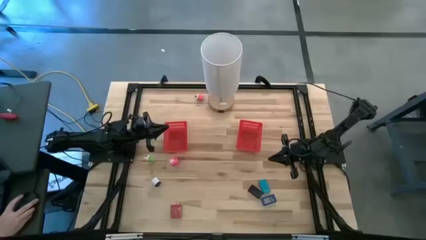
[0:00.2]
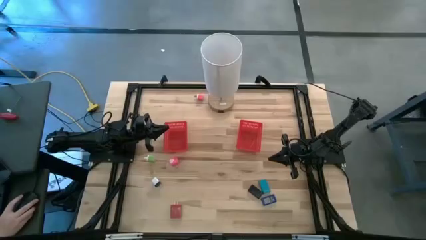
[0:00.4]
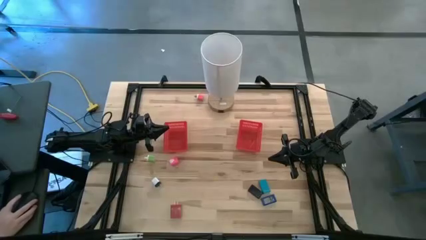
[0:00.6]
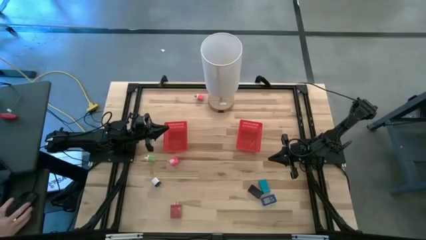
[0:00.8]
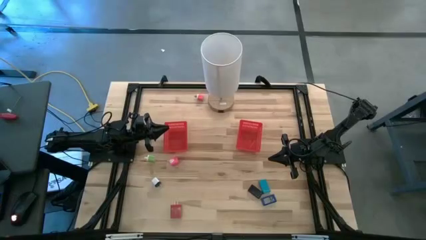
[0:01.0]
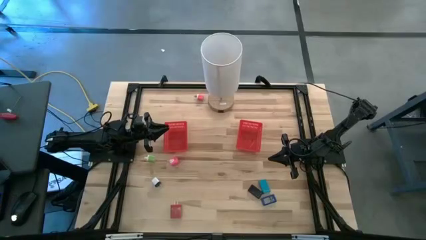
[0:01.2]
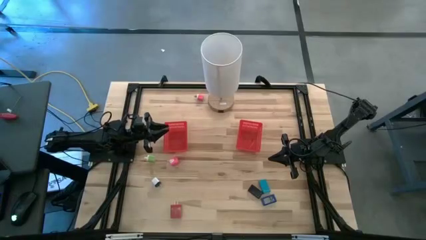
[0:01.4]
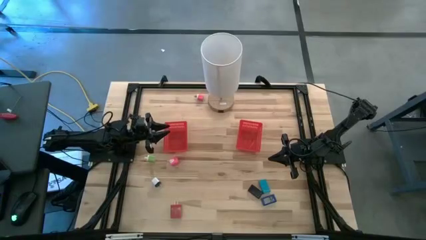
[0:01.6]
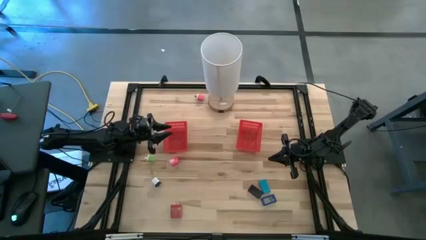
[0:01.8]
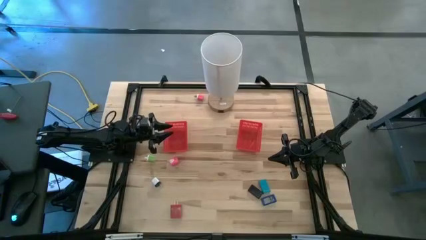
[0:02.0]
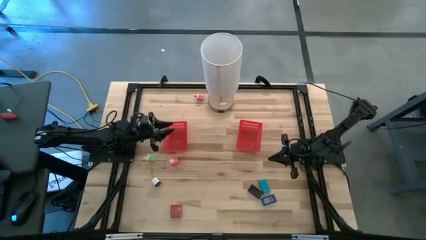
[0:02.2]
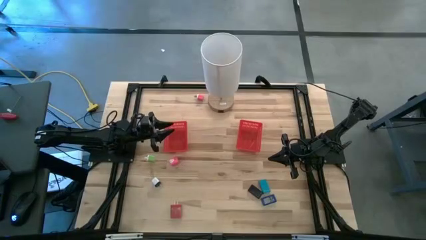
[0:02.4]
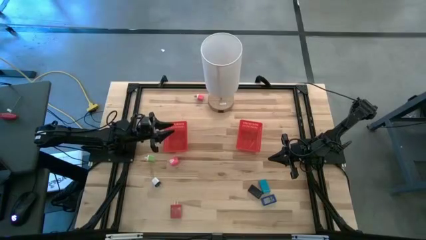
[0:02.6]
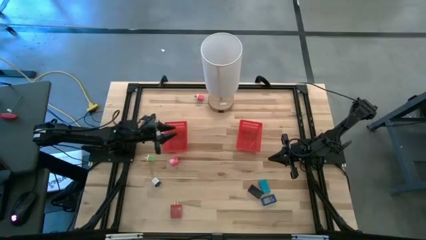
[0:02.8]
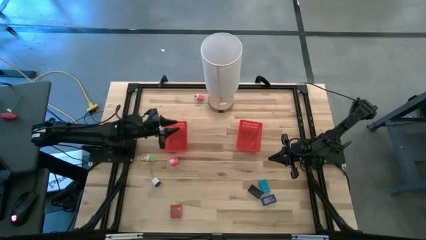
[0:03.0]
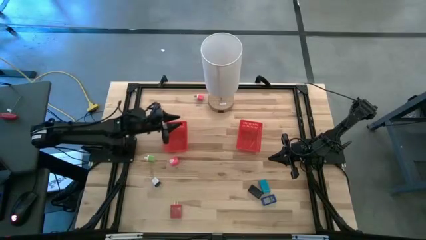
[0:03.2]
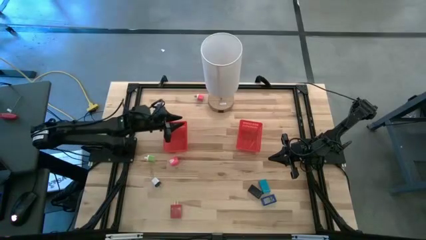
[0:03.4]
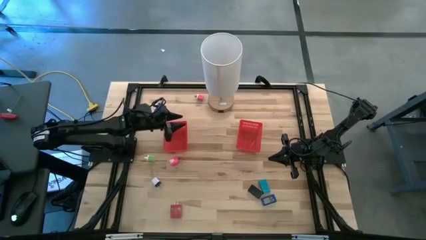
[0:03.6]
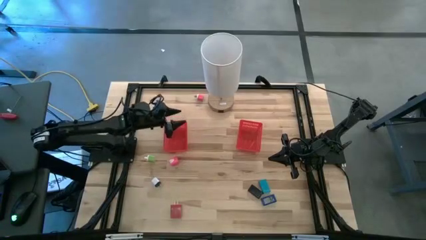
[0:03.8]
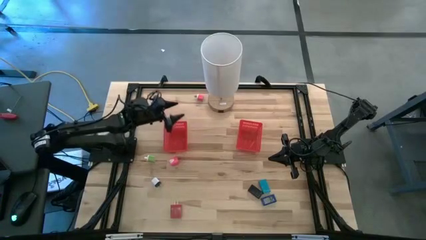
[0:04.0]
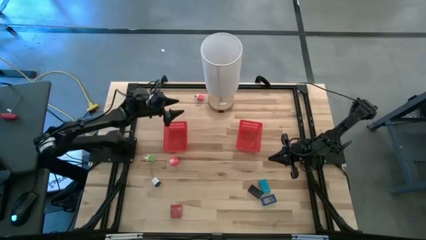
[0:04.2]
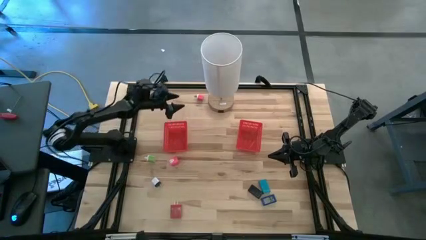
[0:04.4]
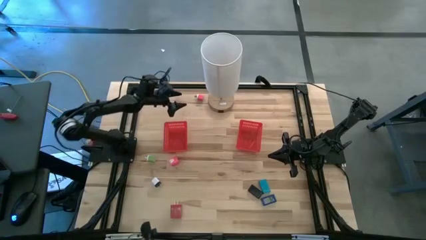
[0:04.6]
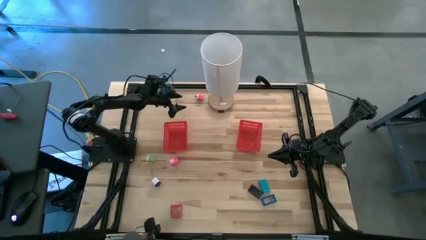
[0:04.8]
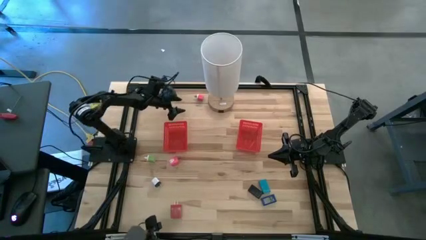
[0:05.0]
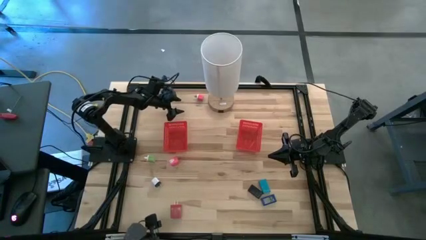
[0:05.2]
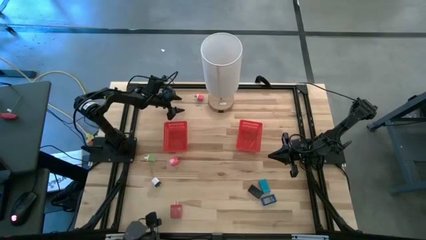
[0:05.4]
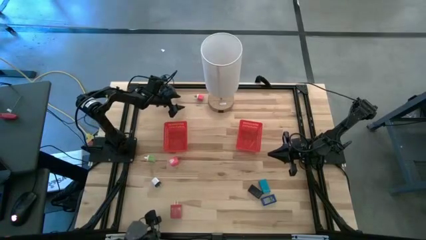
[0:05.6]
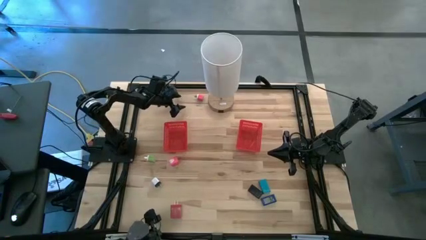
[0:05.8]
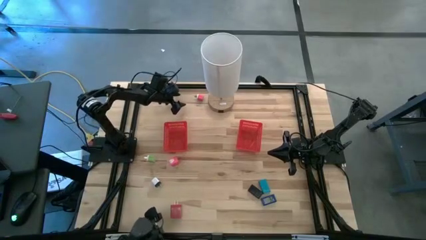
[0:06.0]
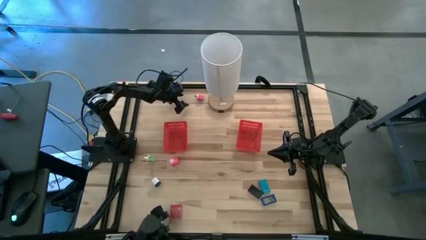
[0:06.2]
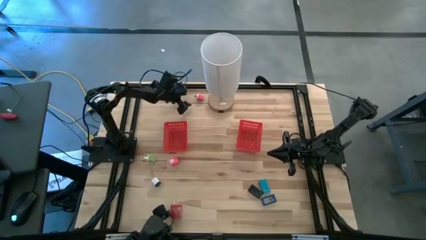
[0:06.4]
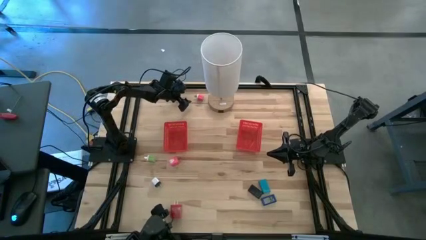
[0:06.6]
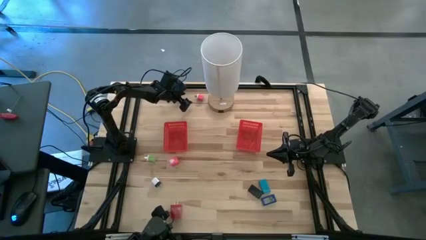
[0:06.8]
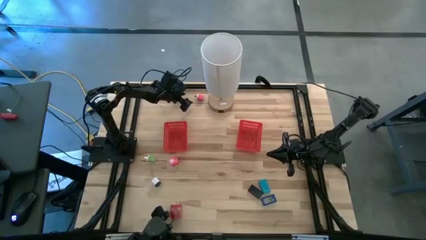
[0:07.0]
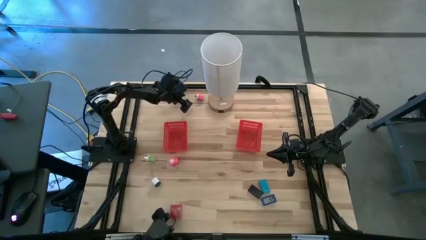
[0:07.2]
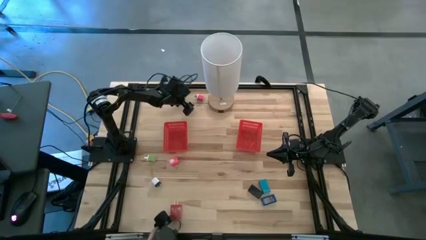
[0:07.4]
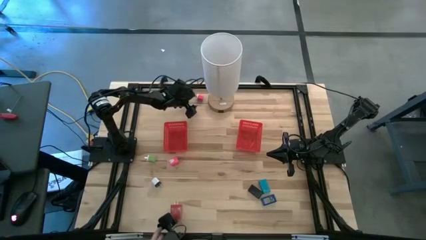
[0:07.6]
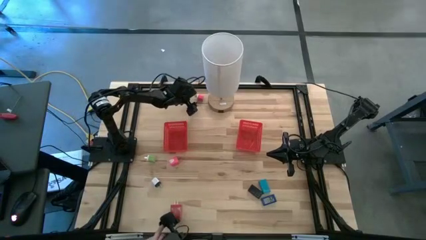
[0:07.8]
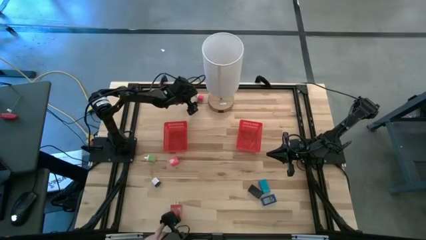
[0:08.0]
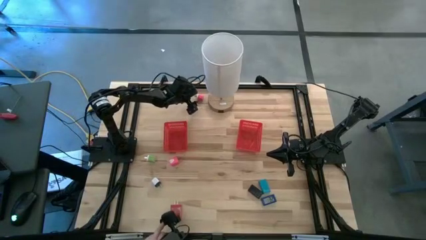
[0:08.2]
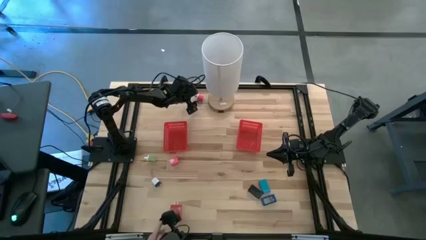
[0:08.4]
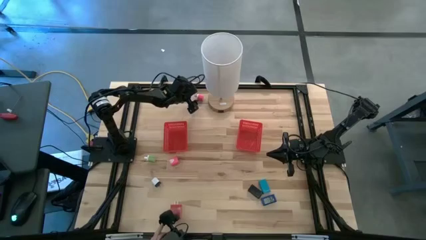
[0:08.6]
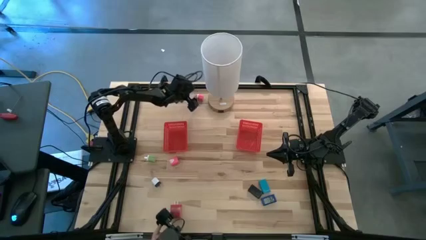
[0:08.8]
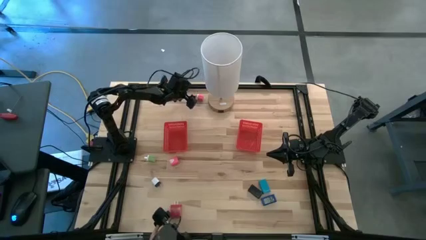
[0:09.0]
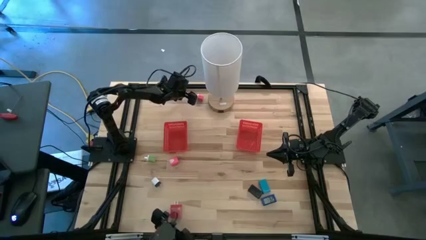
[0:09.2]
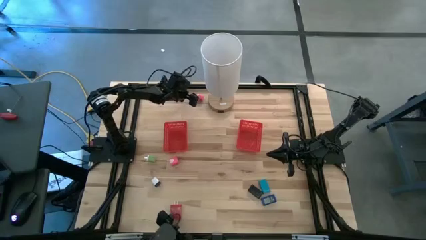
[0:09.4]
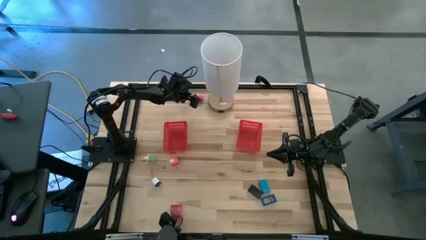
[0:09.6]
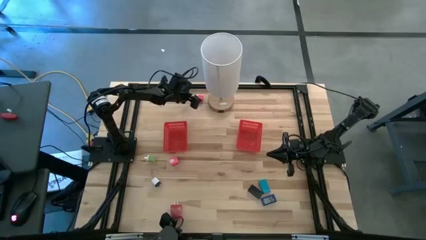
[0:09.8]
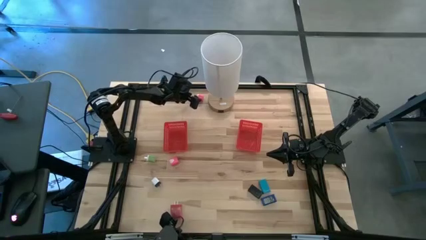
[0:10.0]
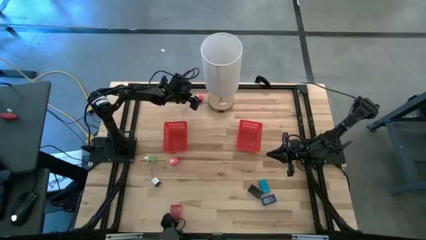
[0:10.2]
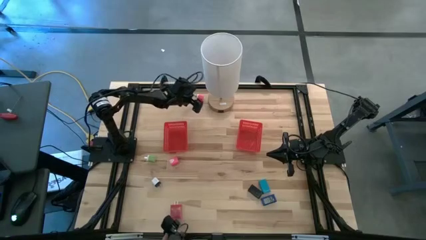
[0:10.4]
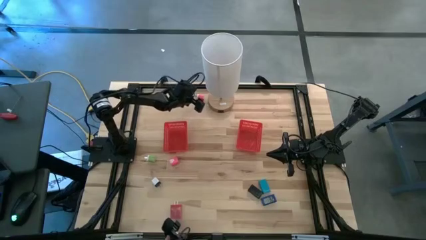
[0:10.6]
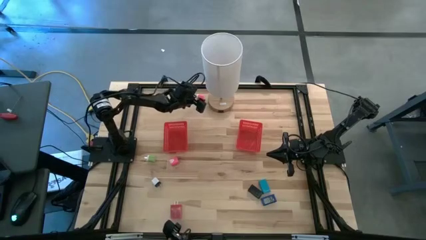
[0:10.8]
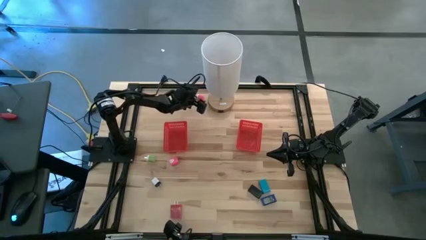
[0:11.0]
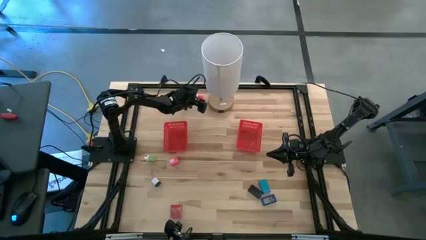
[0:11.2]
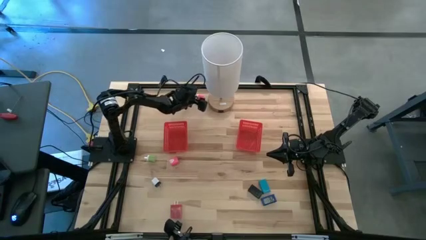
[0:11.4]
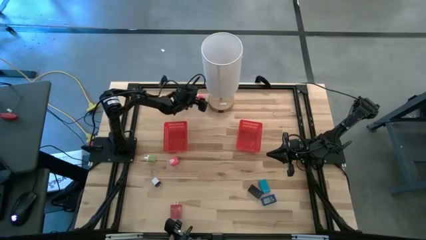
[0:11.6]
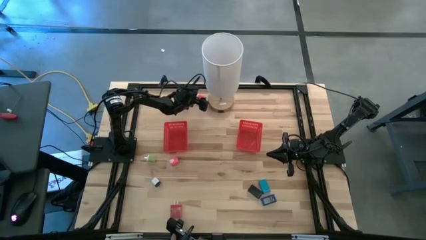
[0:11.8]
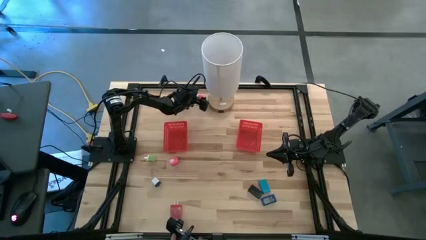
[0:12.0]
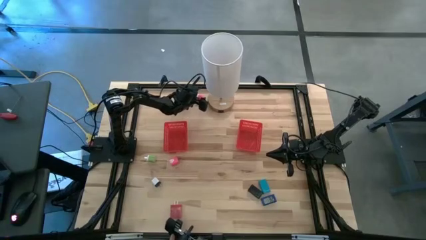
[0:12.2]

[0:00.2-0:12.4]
Task: Pick & Place Office items
Put the top pink charger adapter into the right red bin
